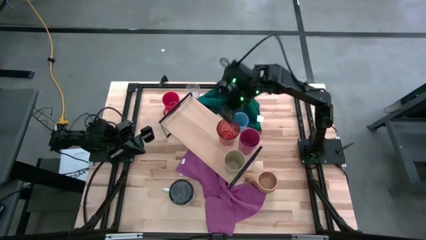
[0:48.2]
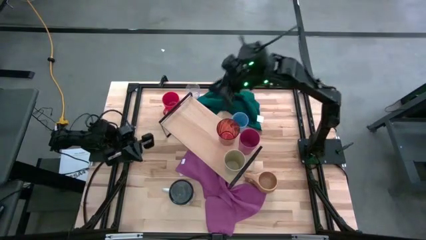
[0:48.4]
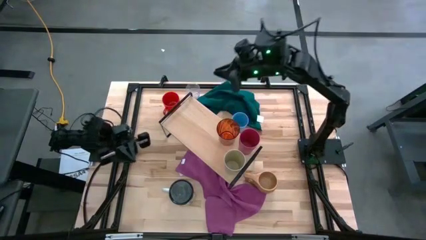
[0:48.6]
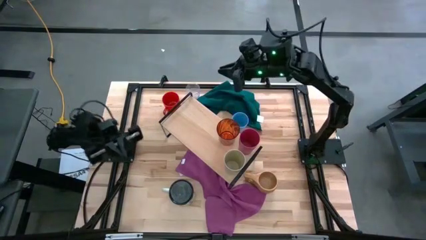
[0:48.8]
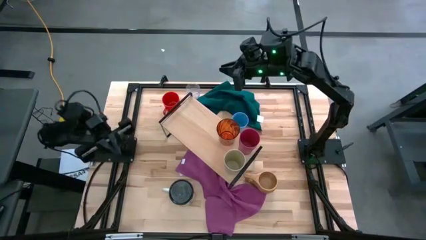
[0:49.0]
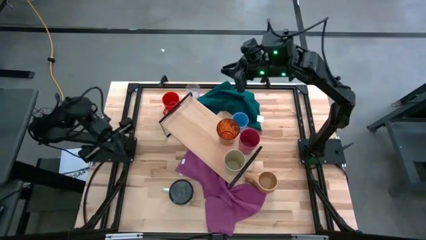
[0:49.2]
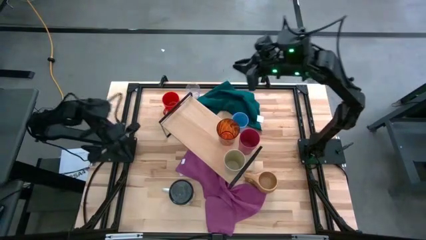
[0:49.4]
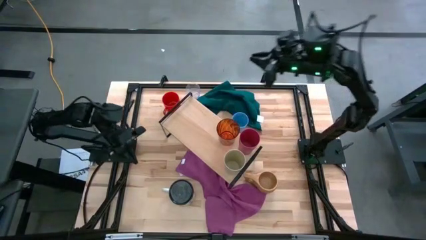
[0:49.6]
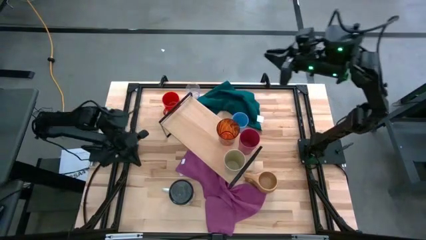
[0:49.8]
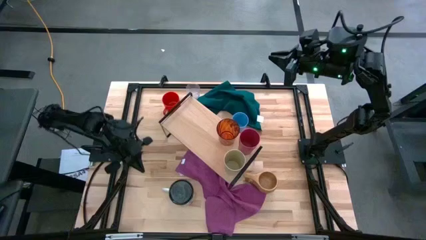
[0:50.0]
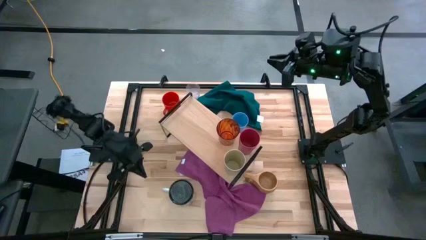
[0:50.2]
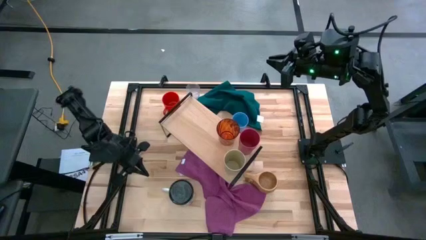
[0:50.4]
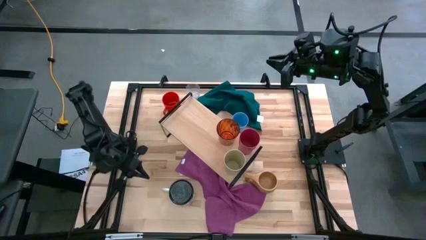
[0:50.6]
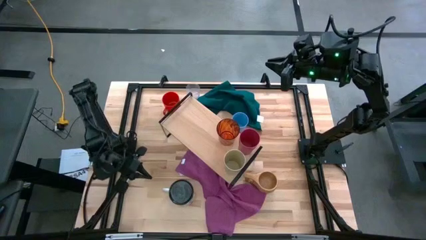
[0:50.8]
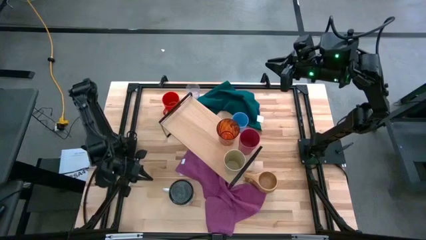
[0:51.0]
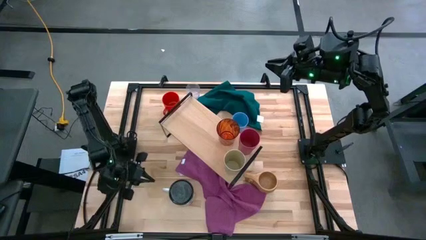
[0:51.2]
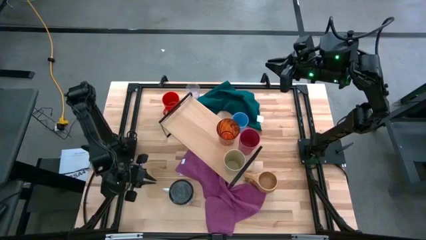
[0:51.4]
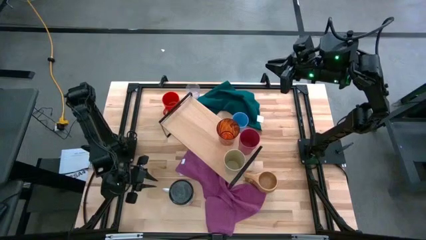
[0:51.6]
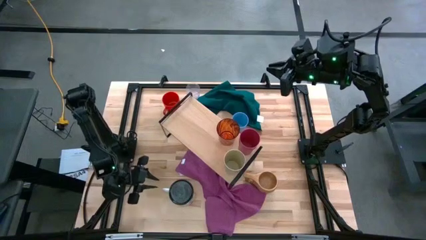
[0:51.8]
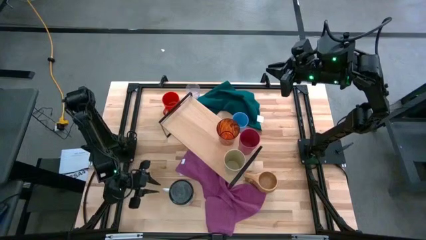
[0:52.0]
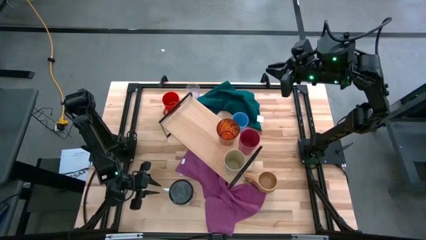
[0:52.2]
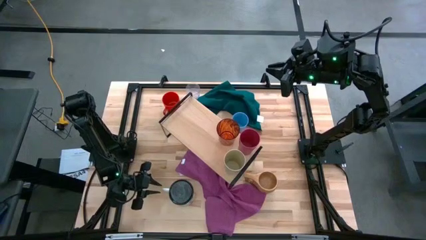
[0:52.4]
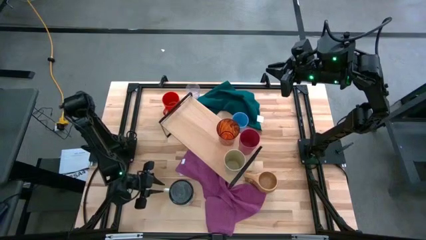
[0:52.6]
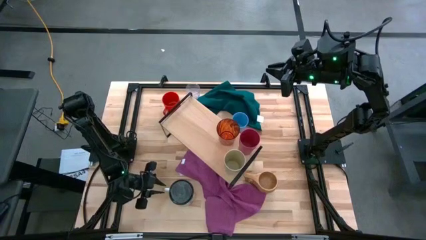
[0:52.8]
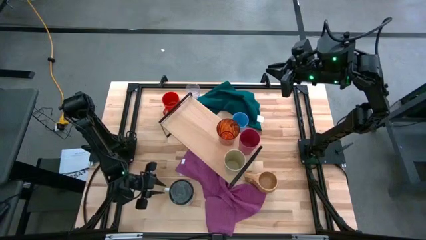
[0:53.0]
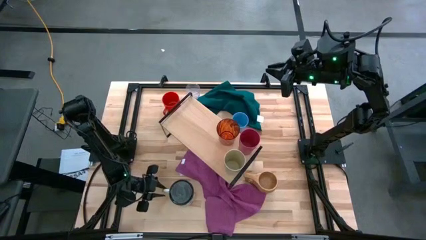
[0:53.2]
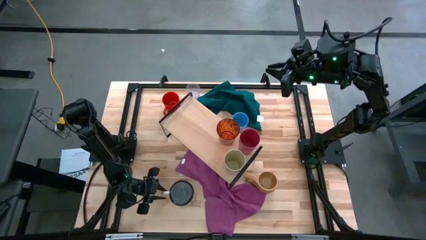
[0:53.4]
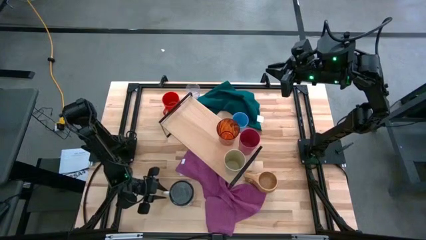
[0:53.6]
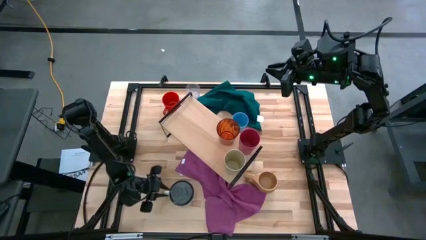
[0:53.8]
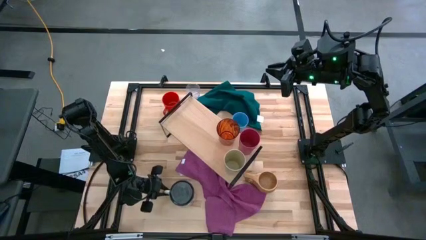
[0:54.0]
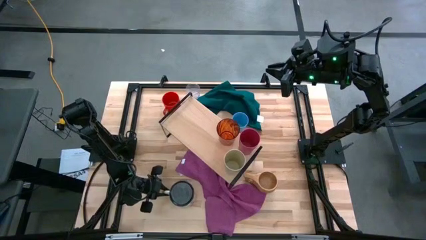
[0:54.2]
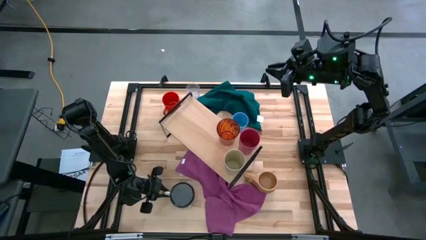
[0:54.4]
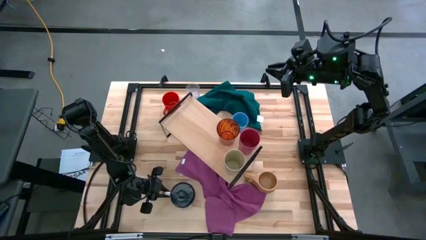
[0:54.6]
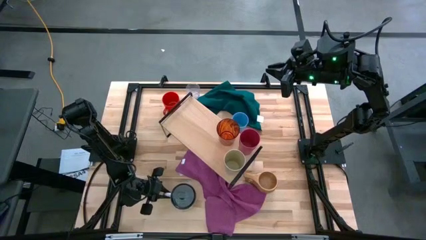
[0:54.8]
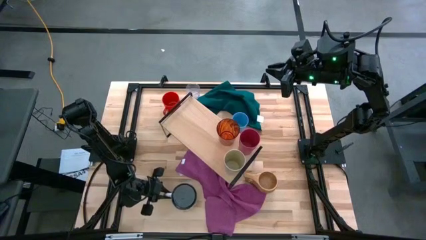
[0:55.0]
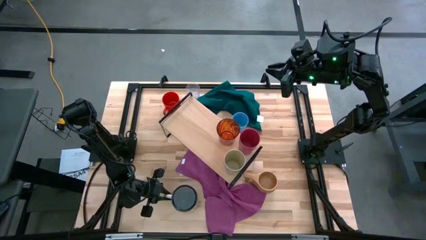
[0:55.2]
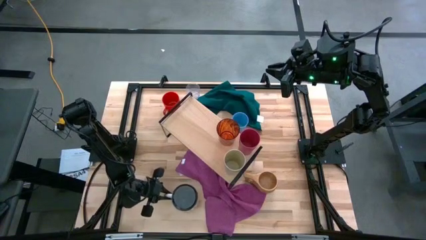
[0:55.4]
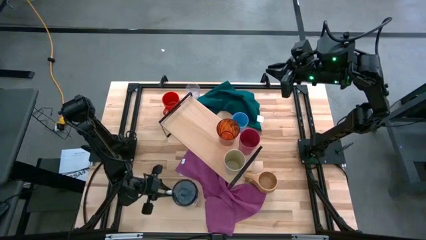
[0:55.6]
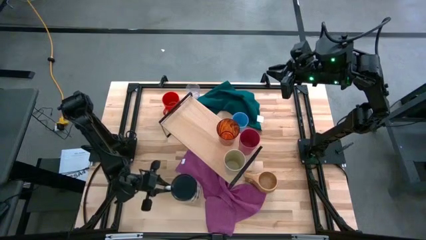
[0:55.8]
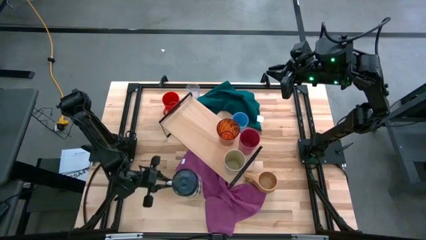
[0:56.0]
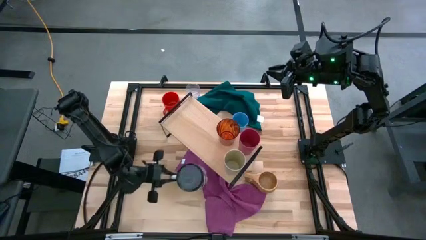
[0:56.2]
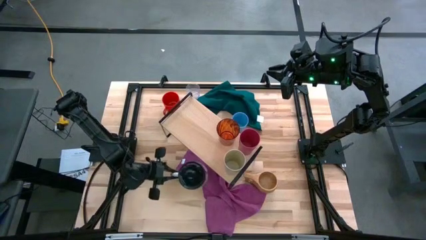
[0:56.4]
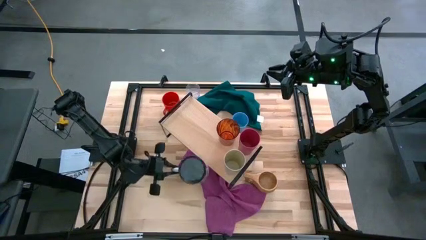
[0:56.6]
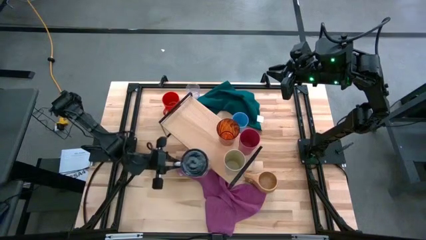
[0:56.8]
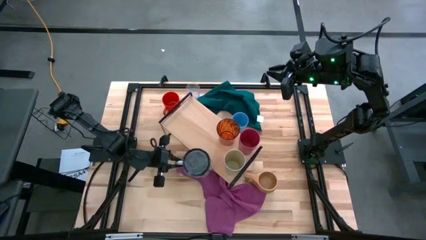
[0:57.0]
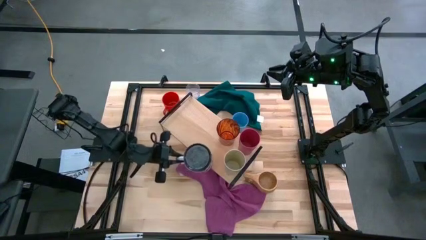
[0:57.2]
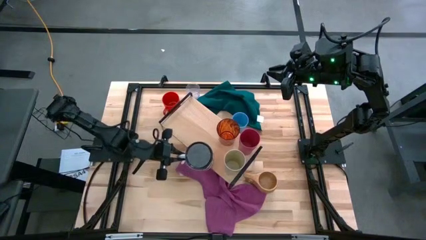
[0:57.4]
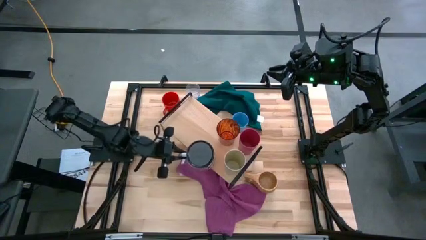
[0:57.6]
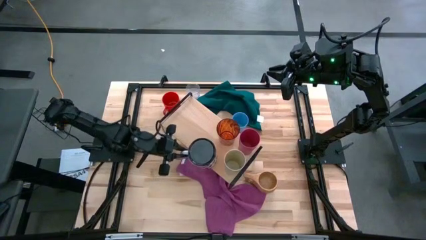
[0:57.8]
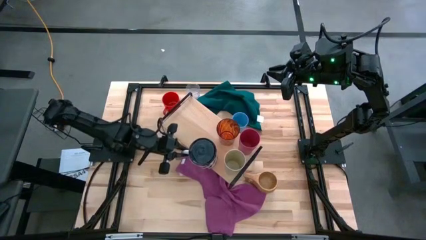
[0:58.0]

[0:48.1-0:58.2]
Task: Stack small to large cups/mugs on shelf
Put the white mug on the shelf

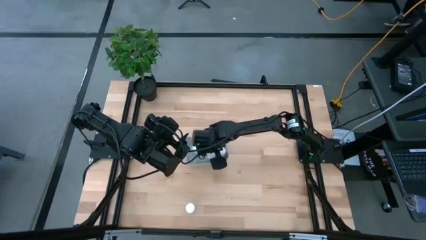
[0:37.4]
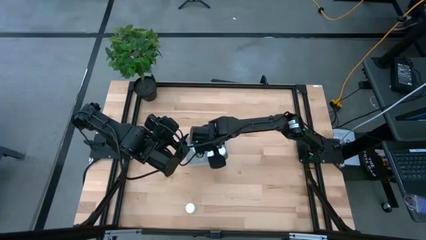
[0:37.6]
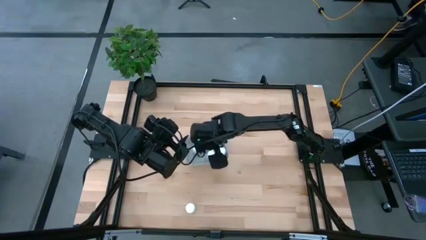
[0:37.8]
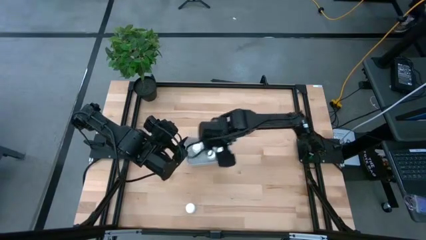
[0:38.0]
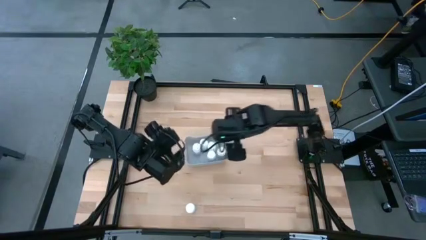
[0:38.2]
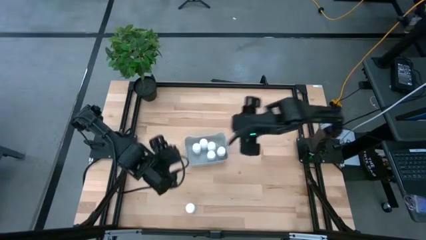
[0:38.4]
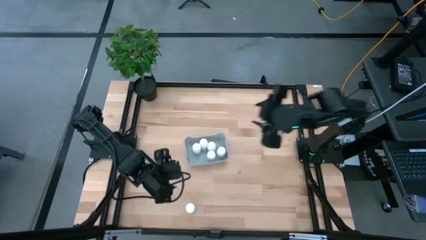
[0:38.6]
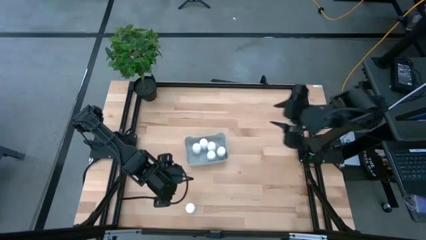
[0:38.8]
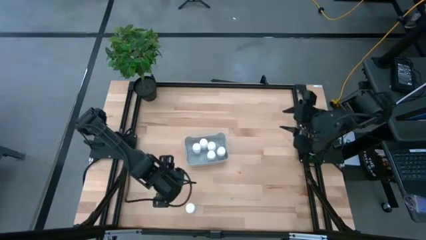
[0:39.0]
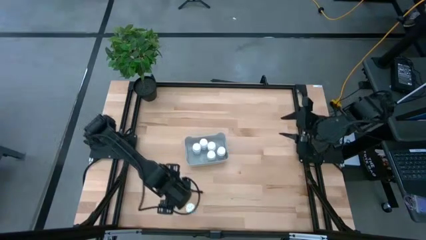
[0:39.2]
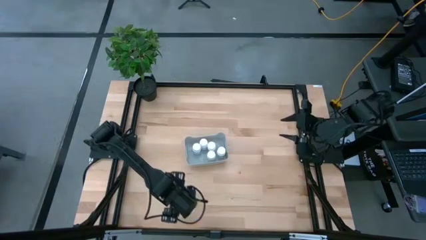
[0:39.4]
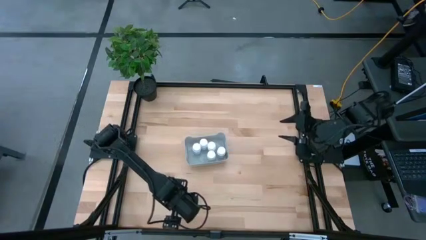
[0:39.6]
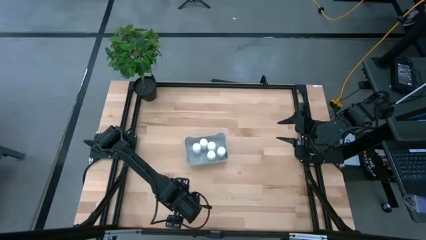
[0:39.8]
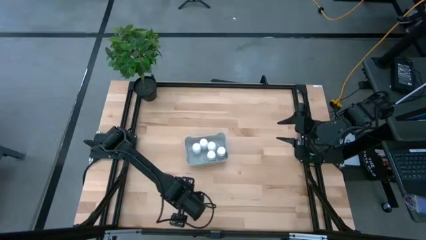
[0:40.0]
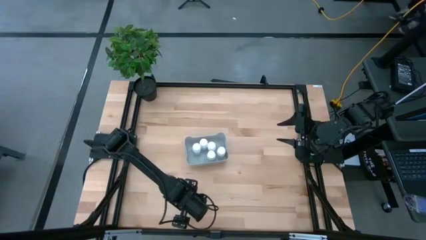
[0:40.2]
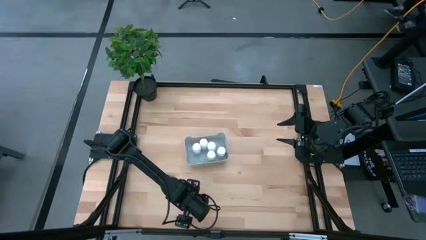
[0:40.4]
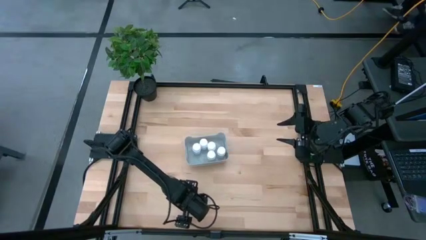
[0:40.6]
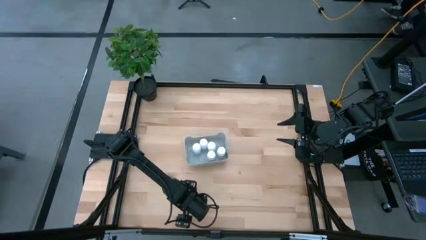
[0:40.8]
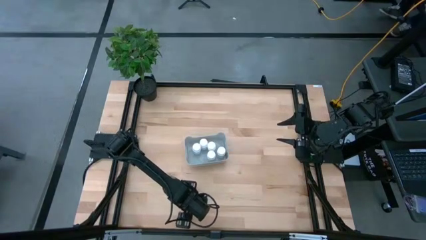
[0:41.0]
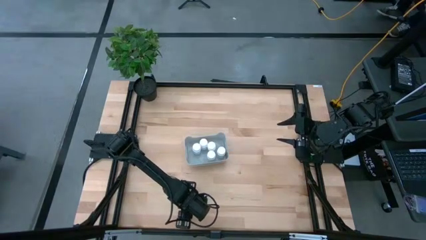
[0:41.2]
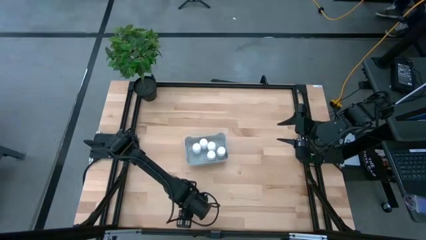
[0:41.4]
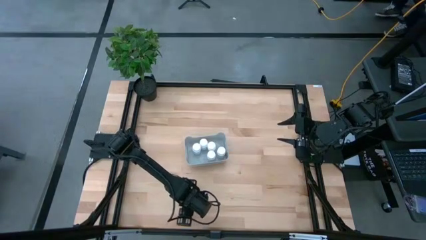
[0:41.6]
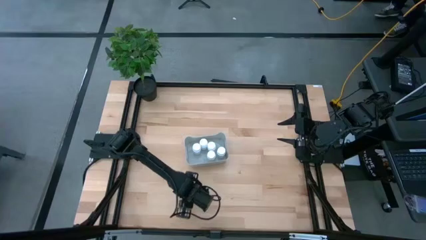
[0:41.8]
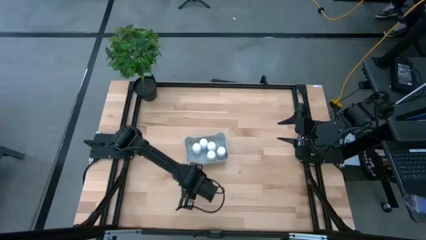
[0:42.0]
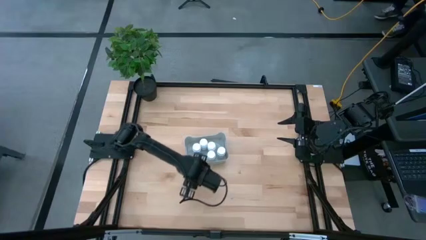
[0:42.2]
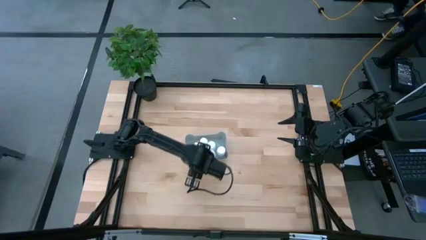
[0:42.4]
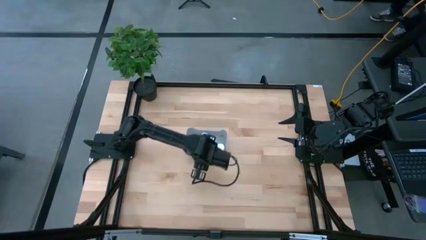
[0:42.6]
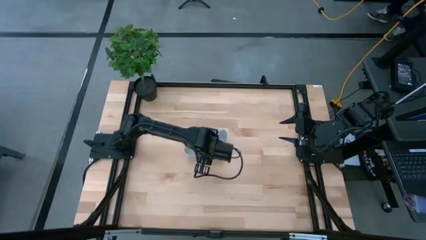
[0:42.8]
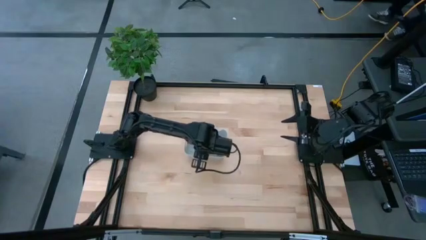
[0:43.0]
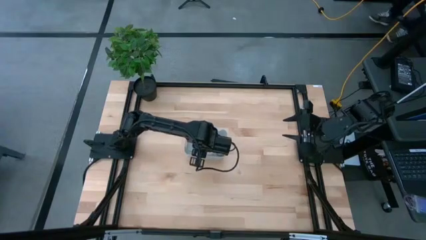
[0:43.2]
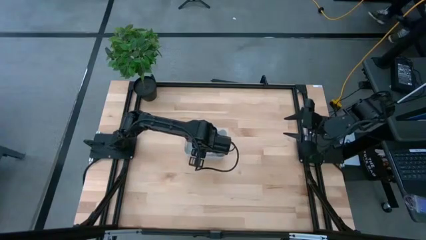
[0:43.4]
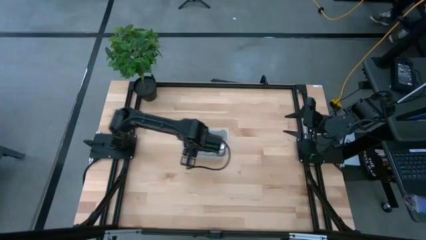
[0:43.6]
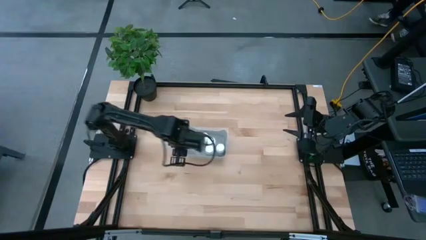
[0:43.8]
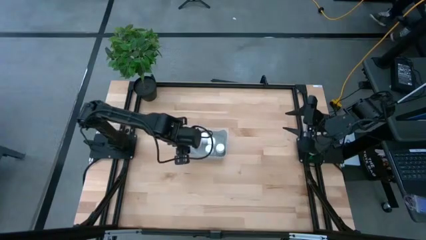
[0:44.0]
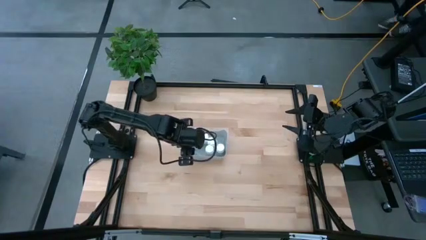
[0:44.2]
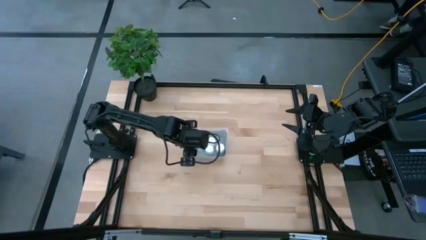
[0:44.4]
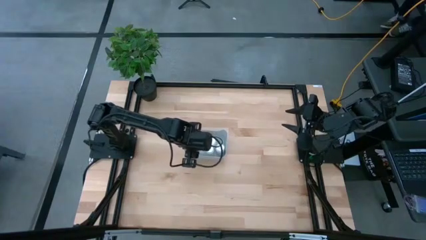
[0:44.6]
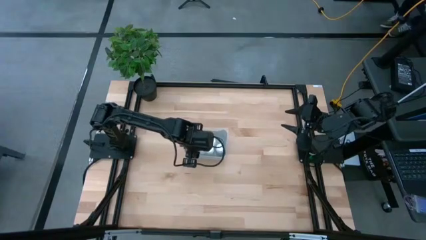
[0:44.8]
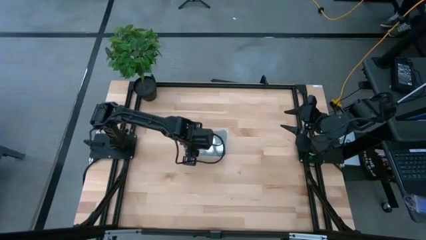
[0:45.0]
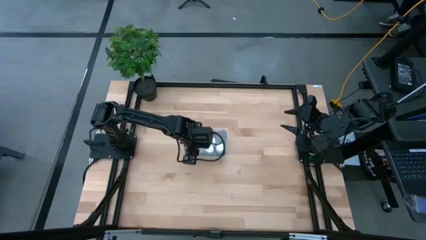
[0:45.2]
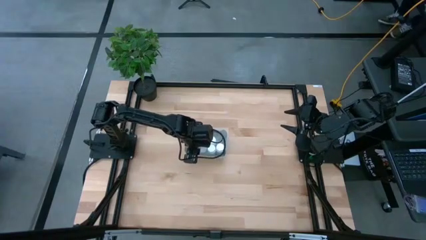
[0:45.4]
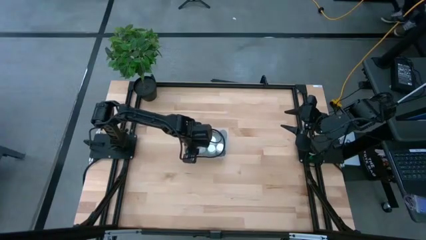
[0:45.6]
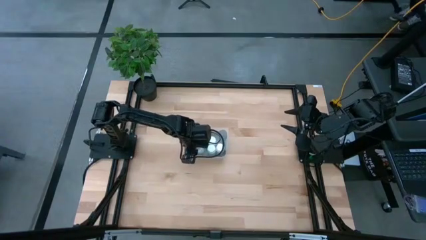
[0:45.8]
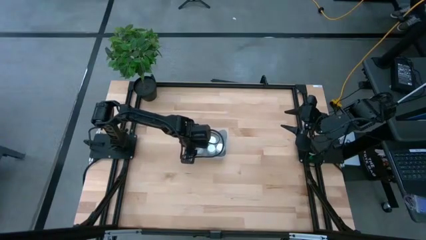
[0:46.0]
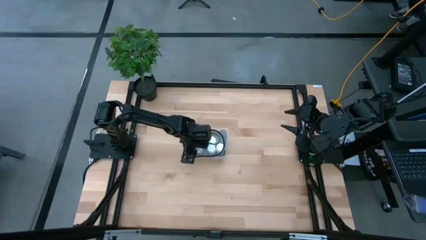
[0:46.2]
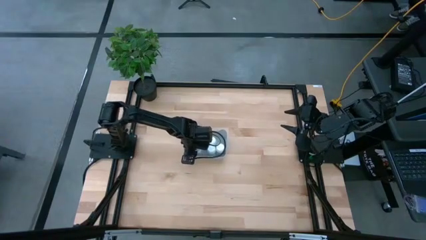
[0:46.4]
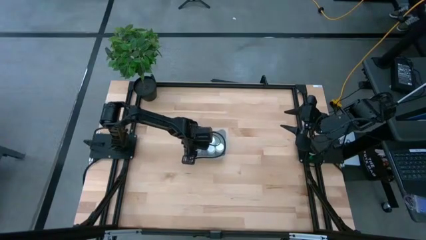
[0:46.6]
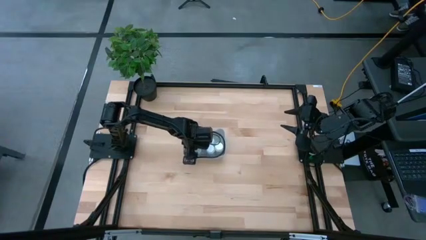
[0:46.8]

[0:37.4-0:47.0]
Task: Pick and place pill bottles into a basket
Put the white pill bottle into the white bin
